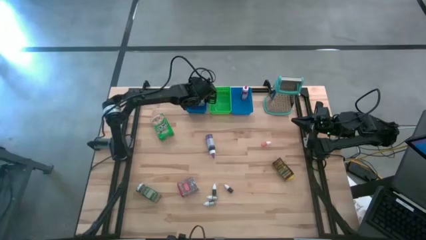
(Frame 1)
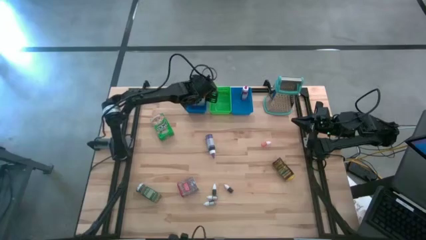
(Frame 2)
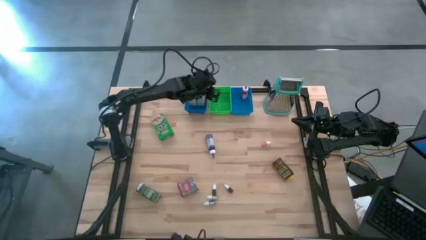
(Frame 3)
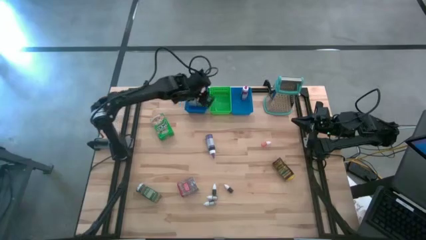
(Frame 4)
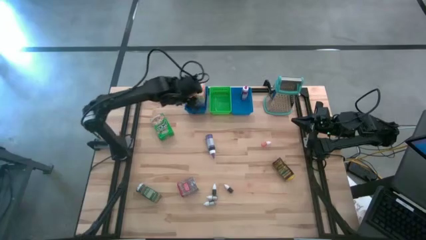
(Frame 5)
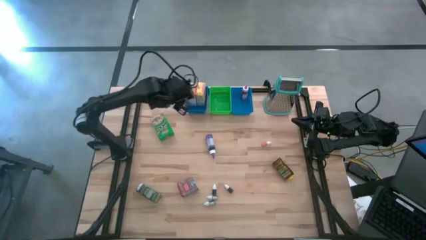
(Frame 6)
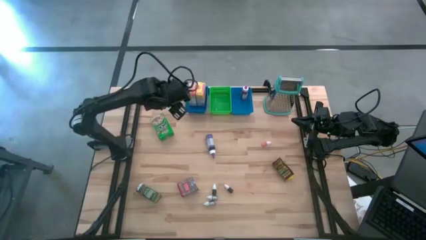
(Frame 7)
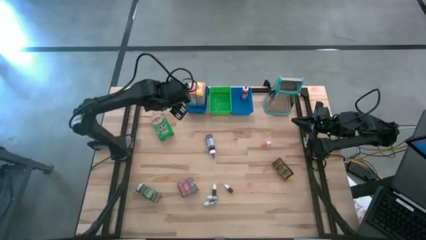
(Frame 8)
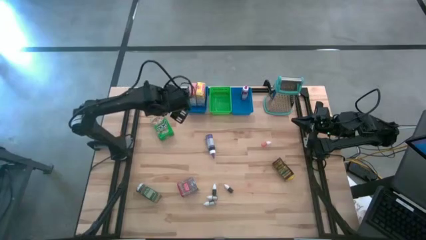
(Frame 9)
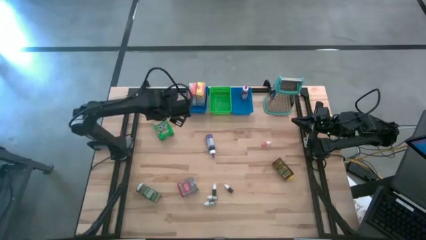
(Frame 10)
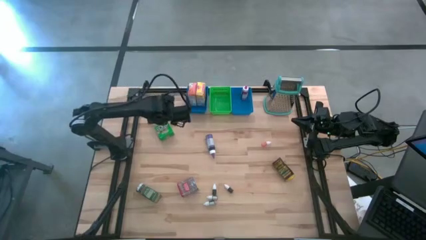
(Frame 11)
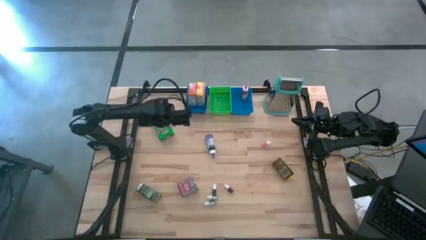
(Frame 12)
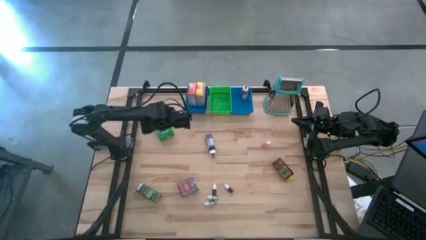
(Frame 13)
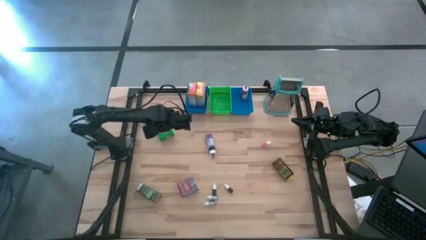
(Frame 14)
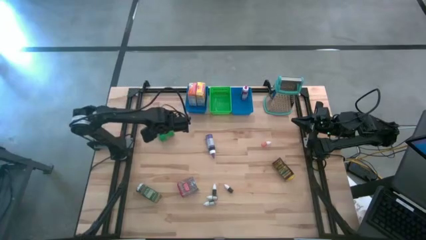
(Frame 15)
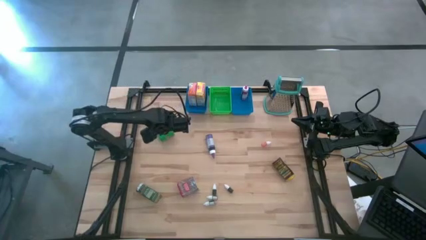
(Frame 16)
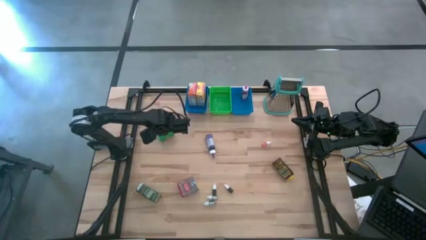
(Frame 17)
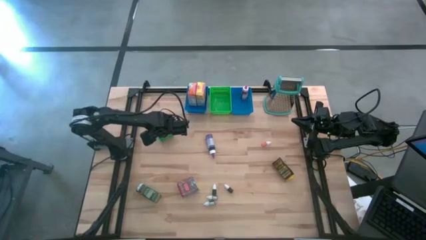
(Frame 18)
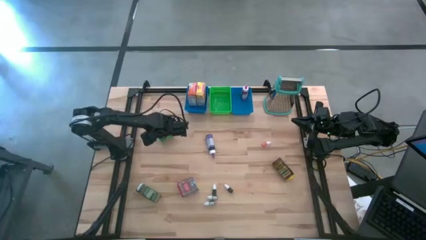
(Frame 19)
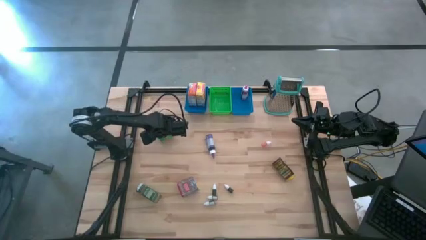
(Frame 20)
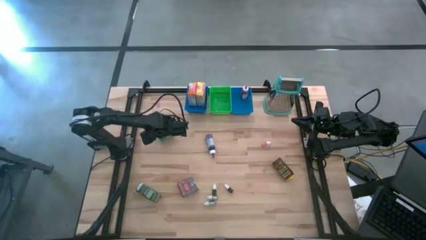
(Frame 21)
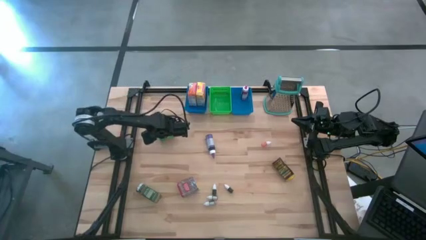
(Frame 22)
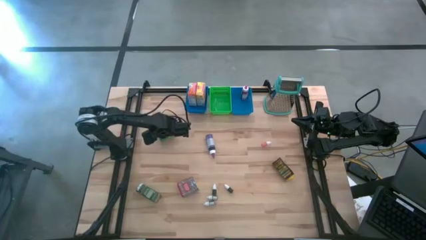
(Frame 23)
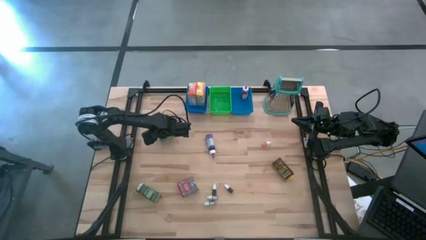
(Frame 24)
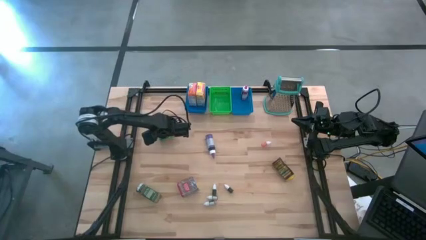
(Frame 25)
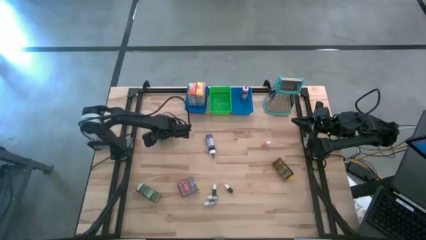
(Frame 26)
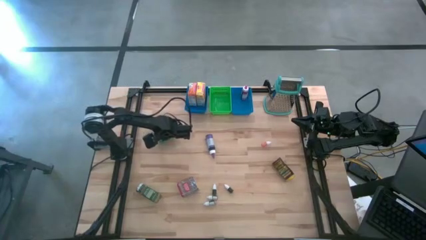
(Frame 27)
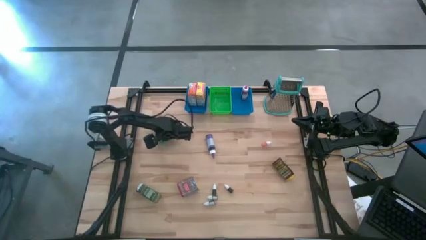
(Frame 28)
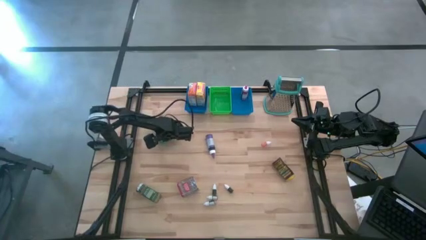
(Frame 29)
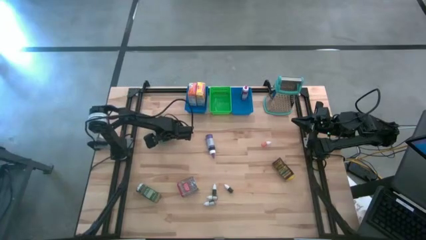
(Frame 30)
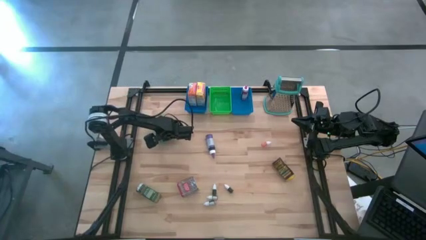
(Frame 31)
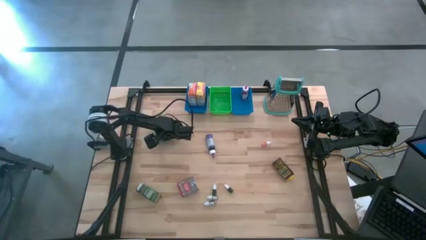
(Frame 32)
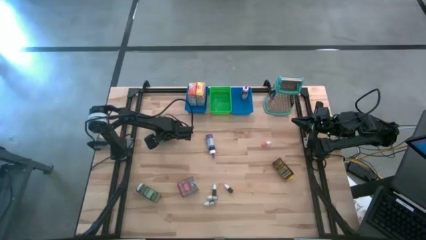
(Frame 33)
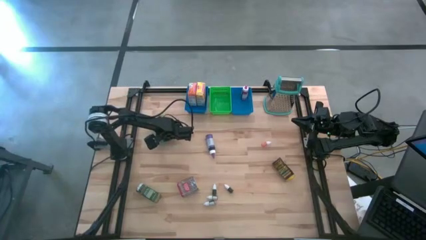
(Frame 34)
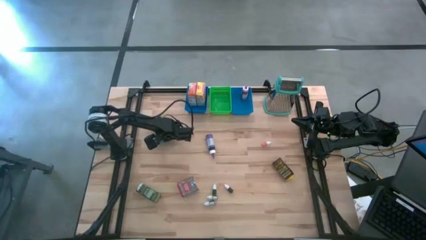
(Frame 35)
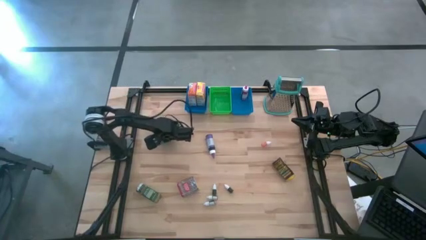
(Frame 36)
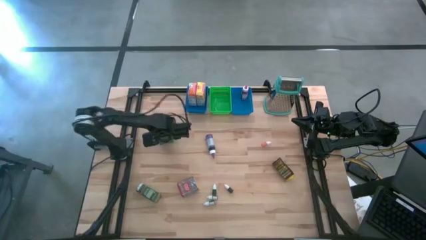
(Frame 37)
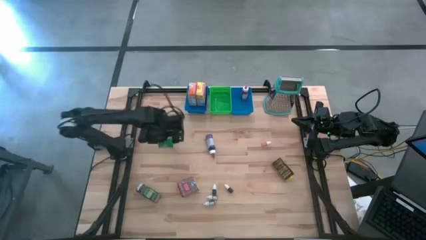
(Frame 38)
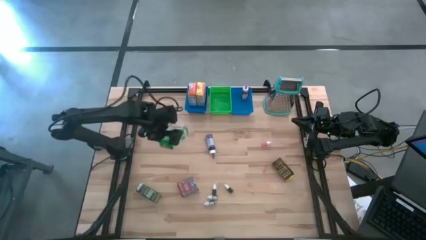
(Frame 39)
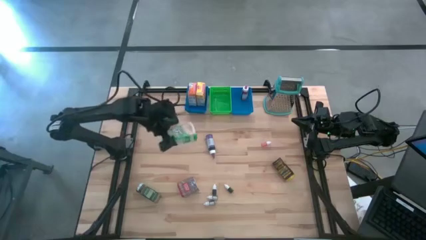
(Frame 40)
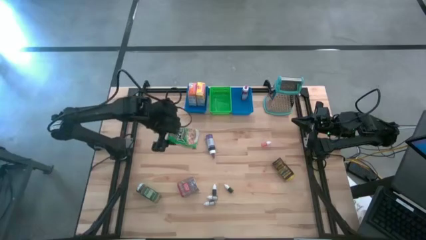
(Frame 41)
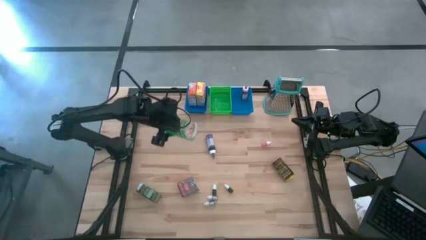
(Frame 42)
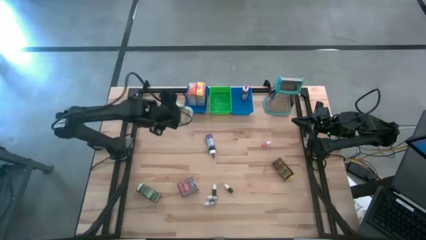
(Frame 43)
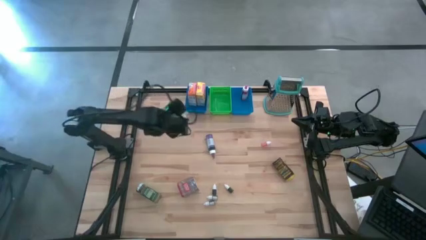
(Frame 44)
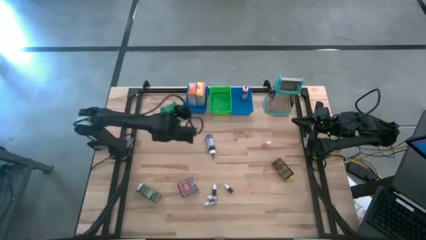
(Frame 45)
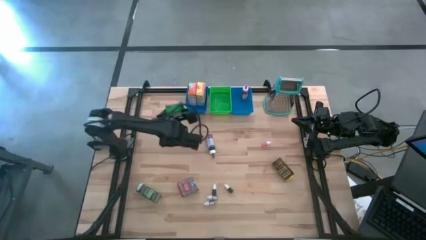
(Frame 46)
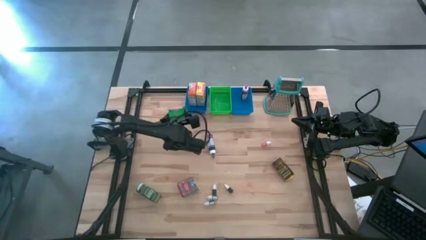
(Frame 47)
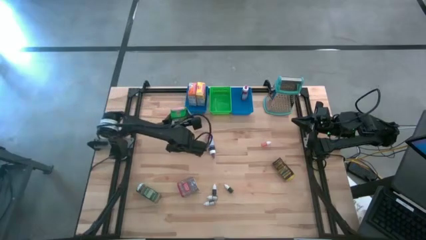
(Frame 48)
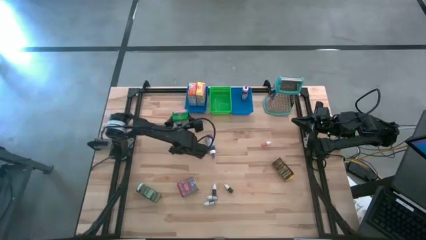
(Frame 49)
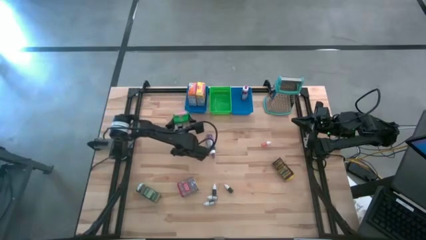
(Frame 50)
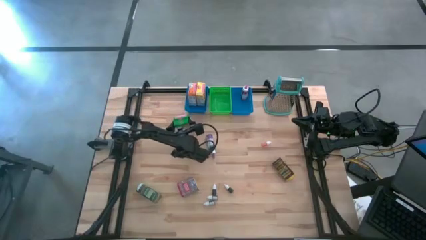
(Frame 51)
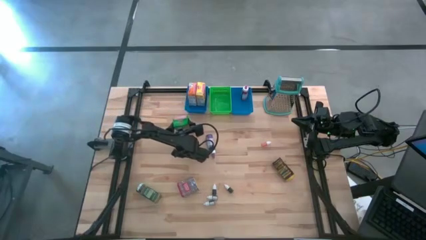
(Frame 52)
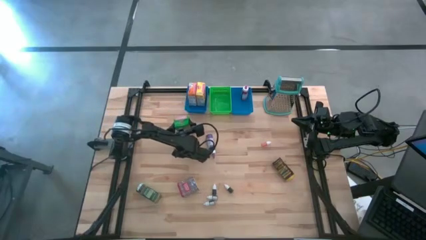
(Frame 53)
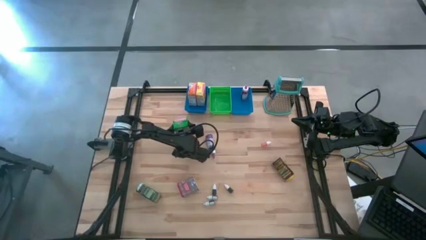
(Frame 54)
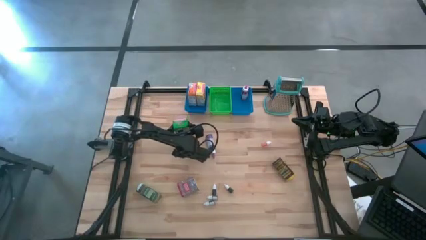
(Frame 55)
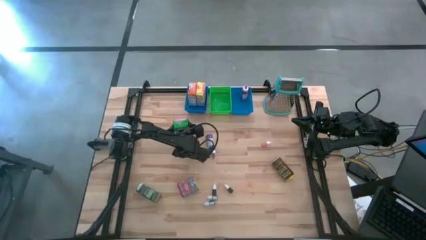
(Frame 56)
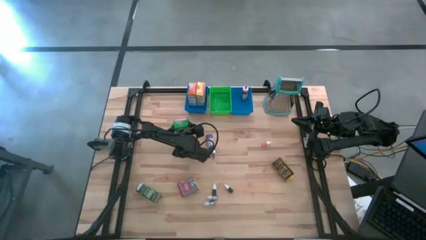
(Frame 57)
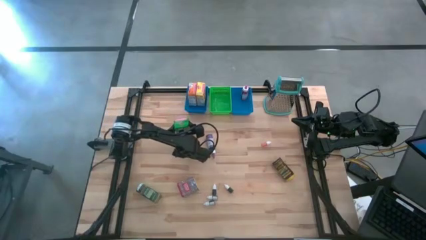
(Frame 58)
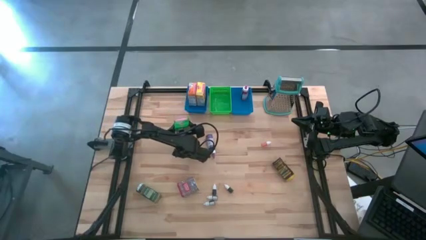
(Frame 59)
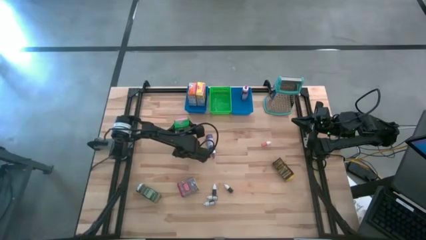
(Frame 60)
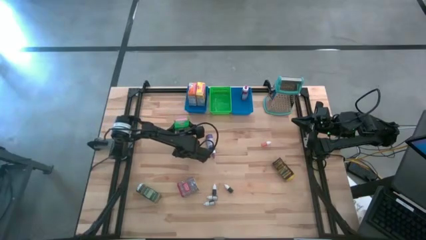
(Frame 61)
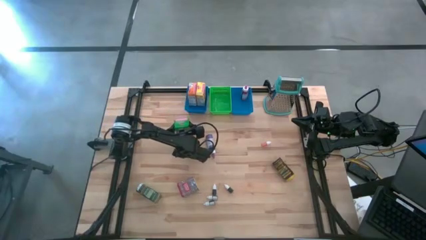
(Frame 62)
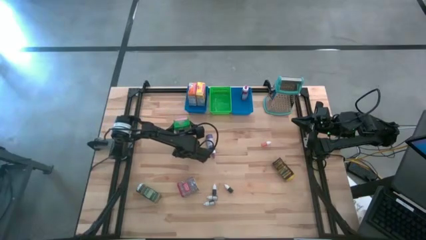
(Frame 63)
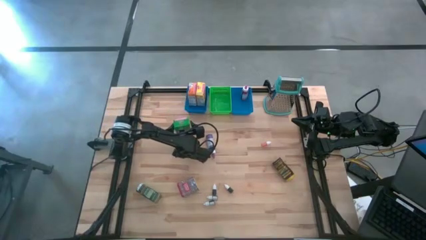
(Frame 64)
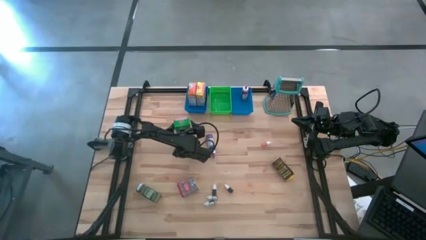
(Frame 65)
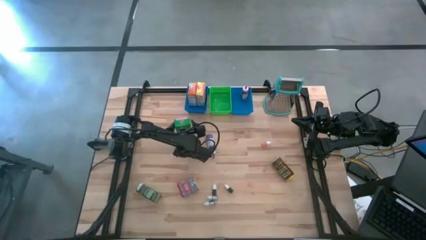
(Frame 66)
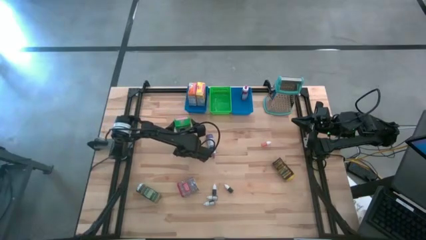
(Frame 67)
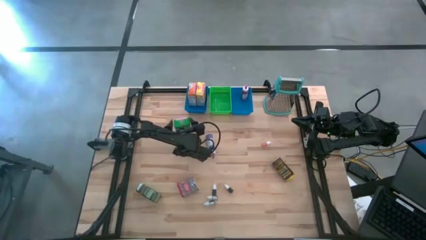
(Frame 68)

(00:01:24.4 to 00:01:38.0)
Task: Pick & Place Kitchen Items
Adjust the green cereal box

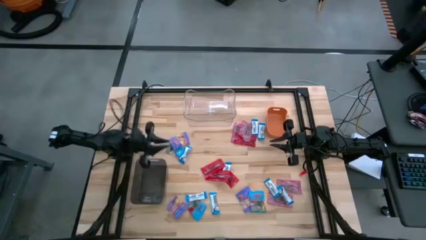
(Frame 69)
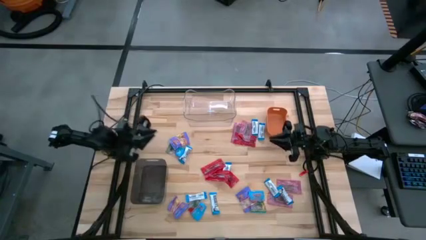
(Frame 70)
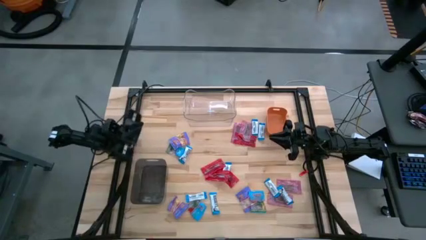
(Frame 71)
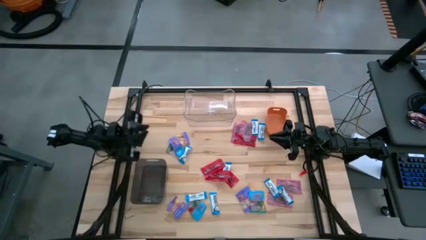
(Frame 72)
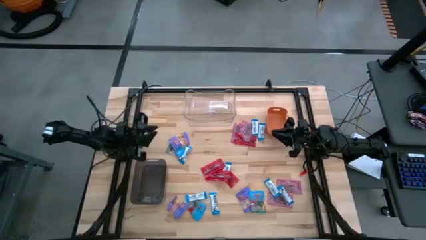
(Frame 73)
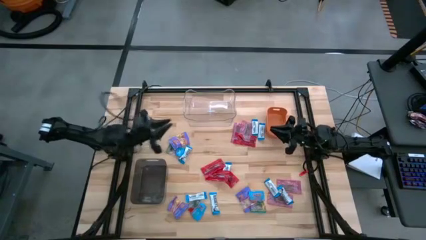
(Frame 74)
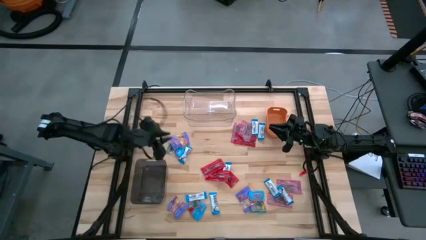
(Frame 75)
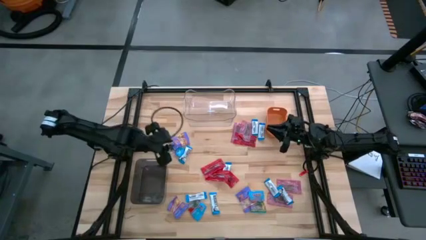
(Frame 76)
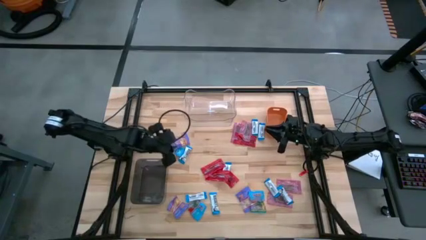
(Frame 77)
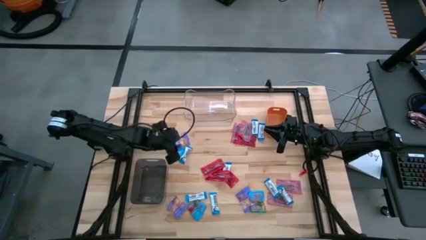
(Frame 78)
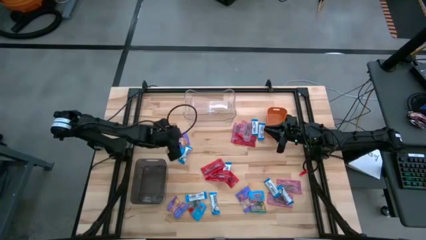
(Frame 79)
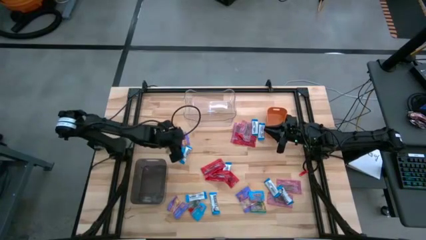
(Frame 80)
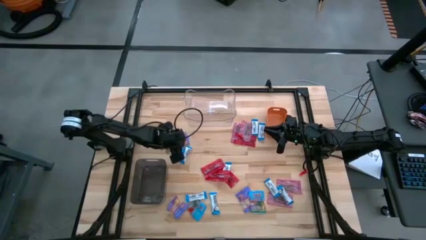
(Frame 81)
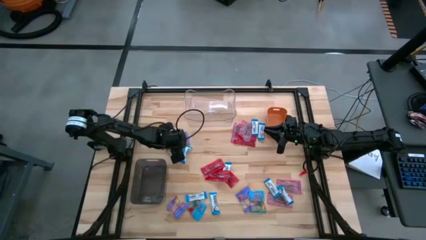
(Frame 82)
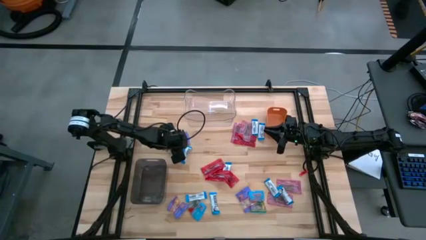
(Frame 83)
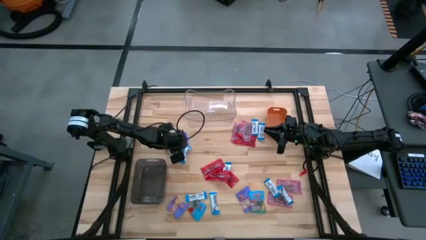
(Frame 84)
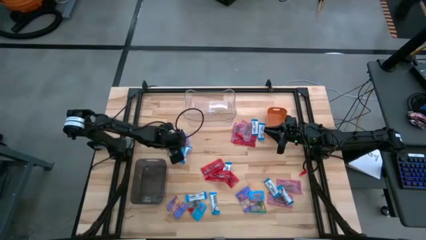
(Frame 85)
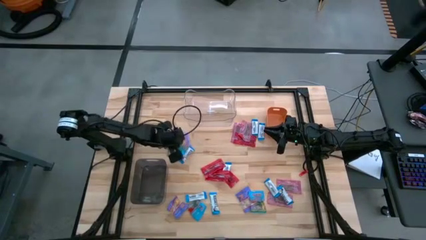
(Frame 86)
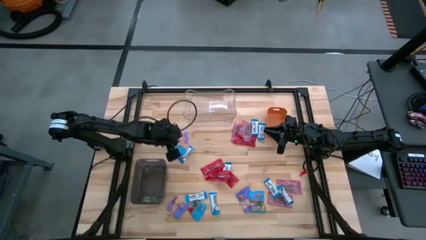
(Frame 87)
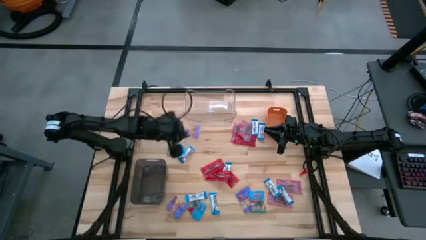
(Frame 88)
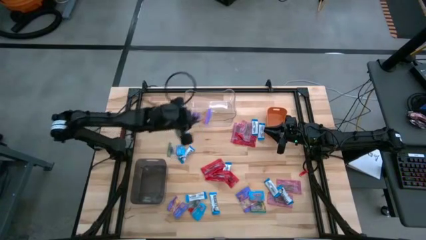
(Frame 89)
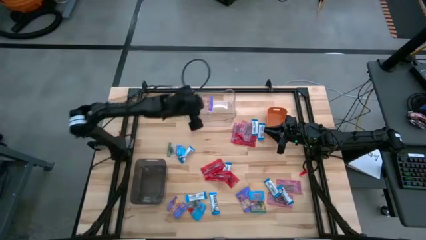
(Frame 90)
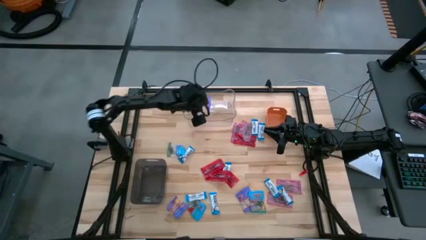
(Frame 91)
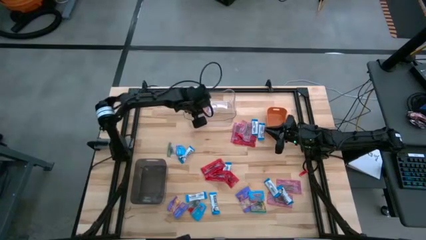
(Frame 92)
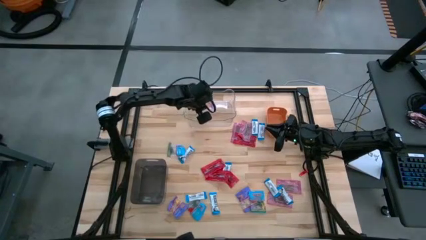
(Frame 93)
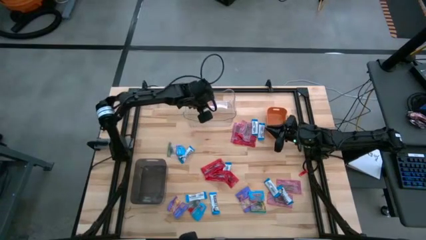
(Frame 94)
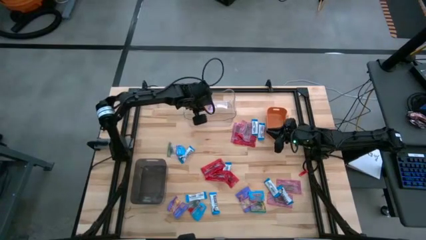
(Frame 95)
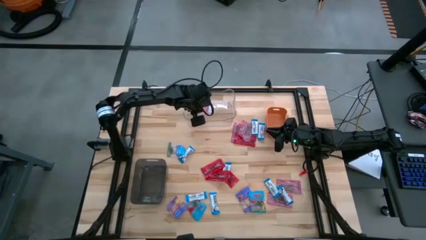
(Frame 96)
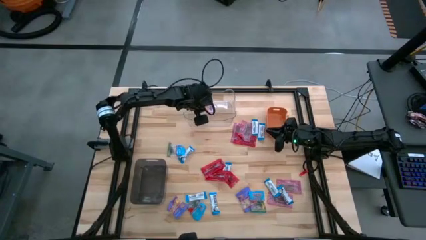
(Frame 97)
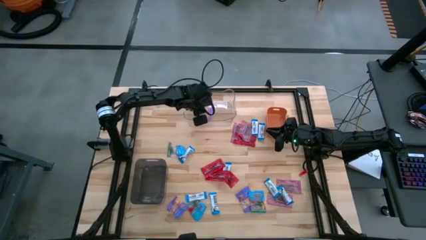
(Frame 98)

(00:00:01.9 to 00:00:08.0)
Task: Sort candy
Put the dark blue gummy into the transparent bin
